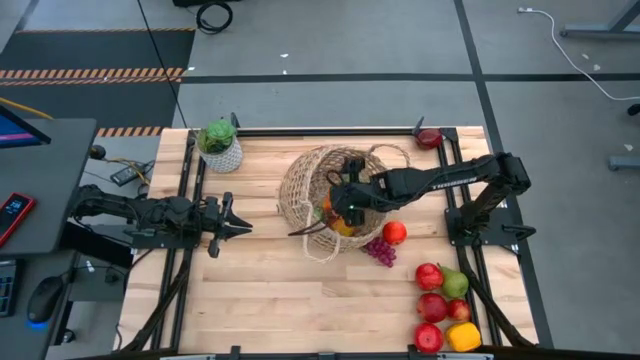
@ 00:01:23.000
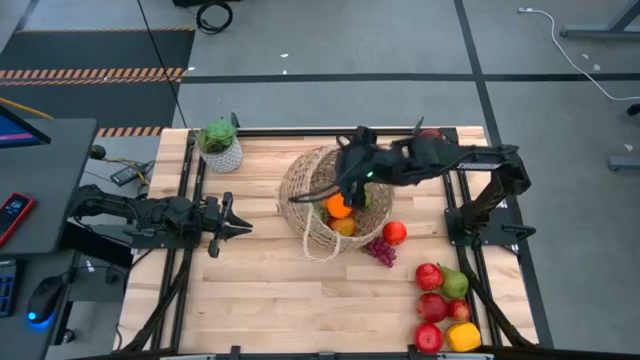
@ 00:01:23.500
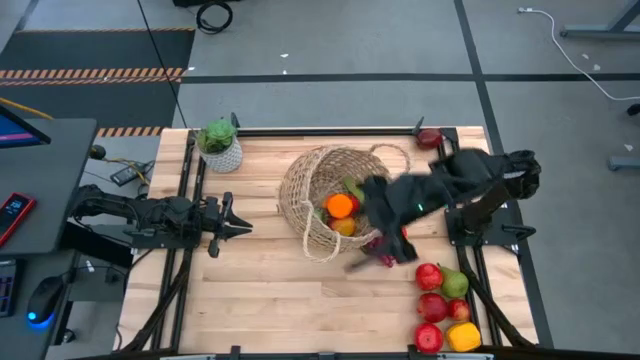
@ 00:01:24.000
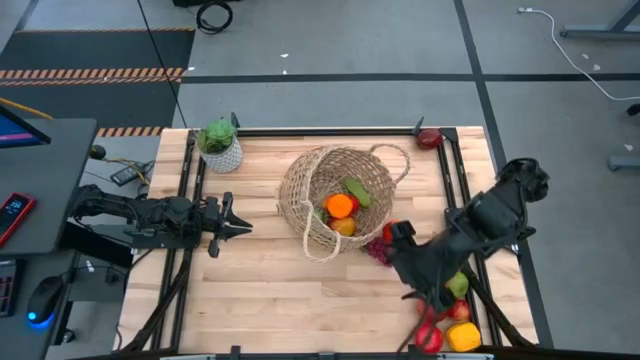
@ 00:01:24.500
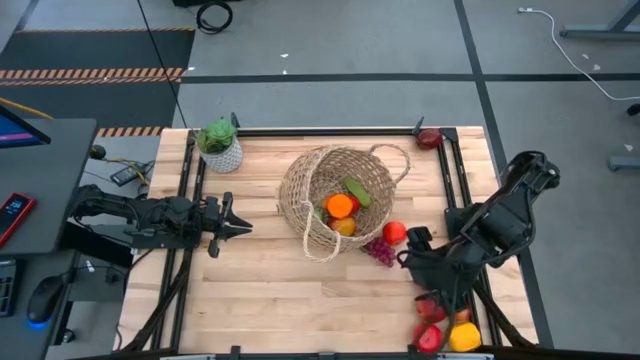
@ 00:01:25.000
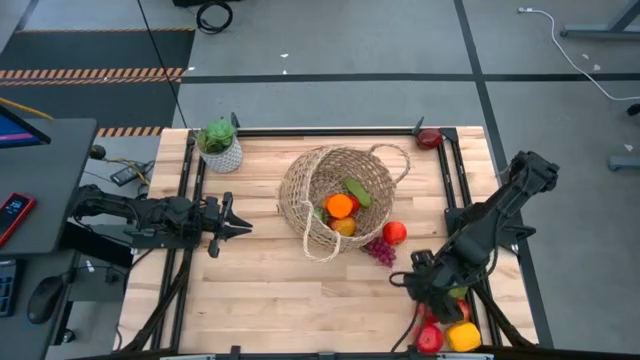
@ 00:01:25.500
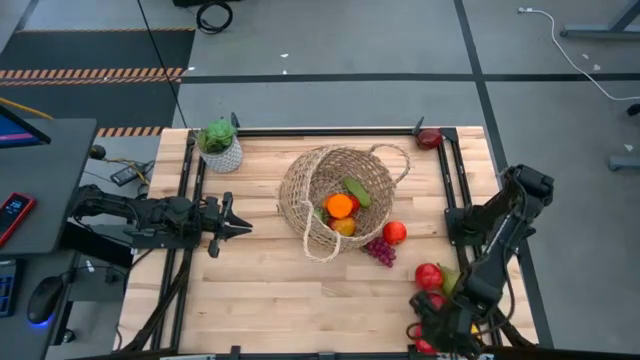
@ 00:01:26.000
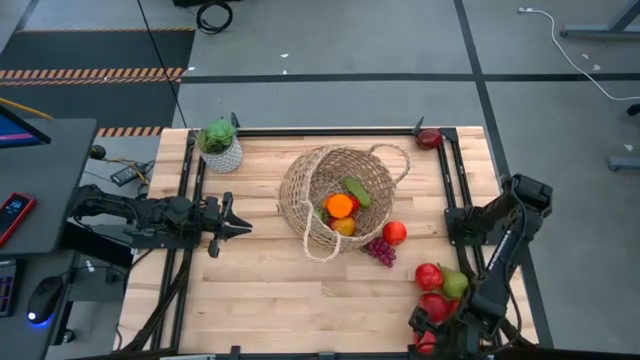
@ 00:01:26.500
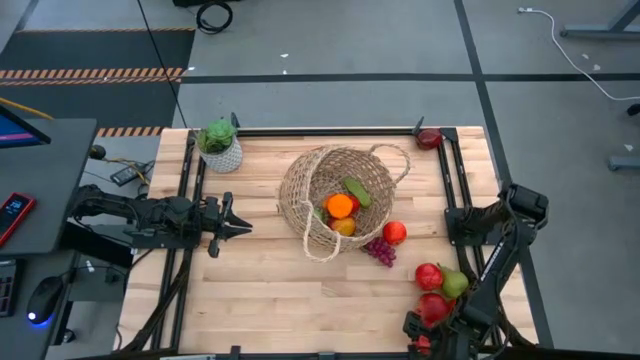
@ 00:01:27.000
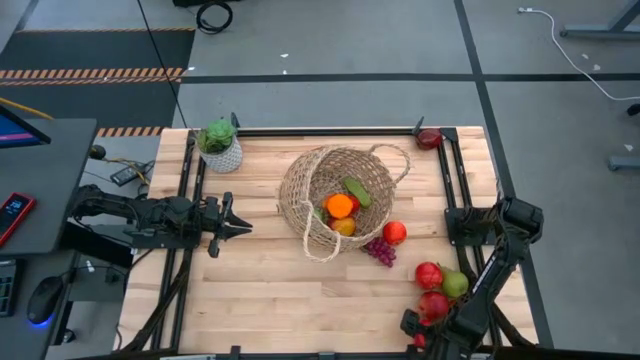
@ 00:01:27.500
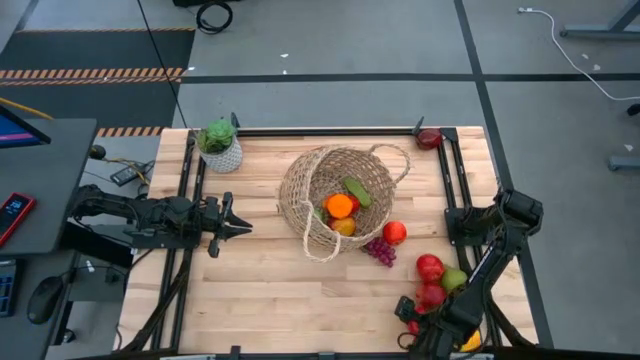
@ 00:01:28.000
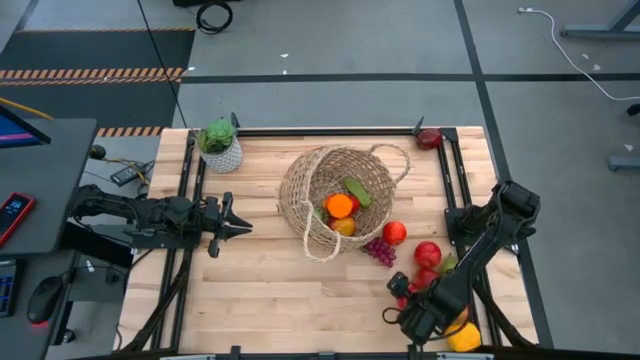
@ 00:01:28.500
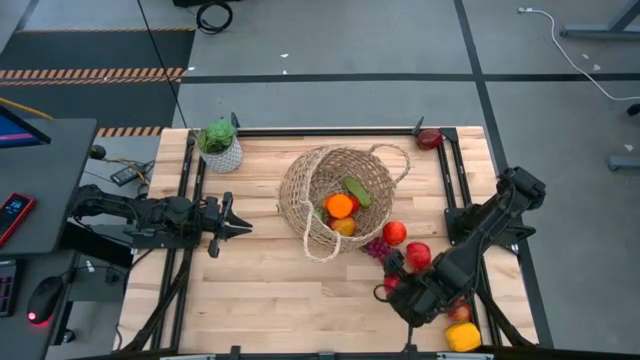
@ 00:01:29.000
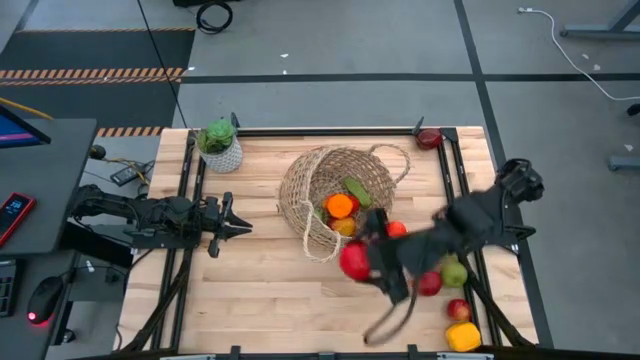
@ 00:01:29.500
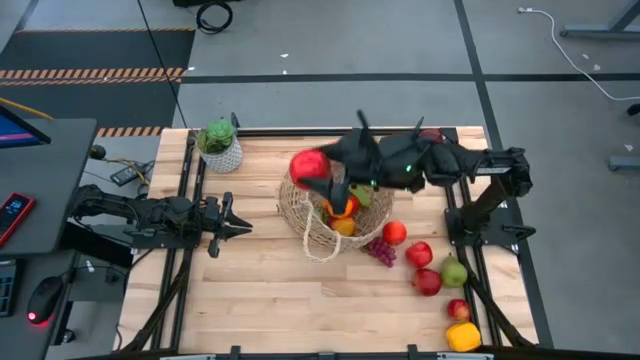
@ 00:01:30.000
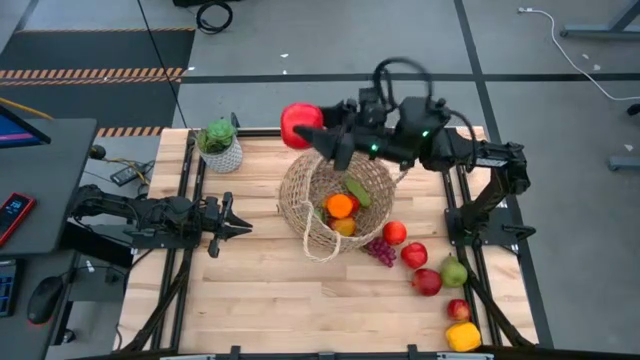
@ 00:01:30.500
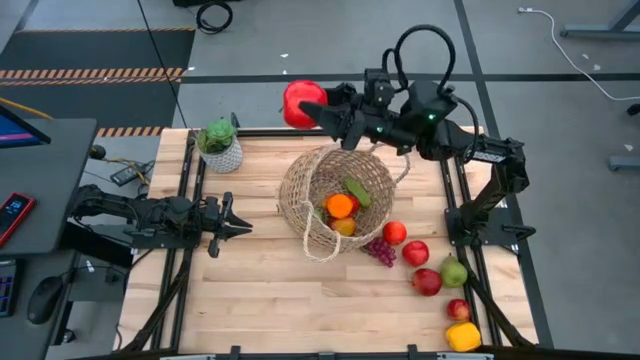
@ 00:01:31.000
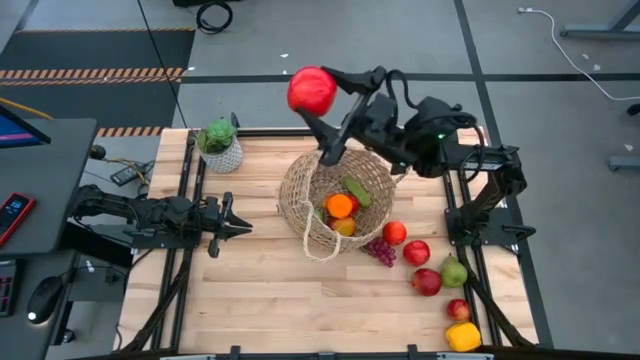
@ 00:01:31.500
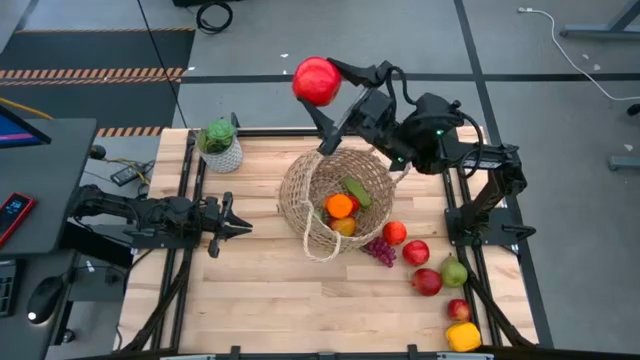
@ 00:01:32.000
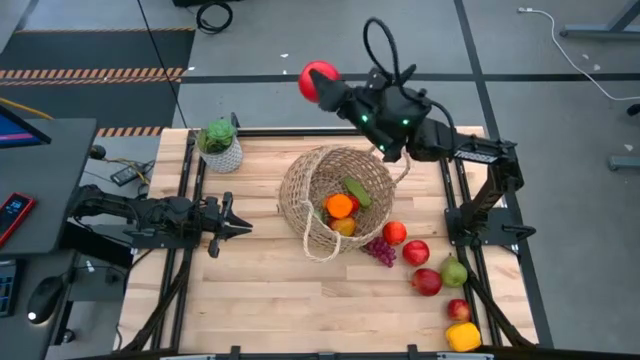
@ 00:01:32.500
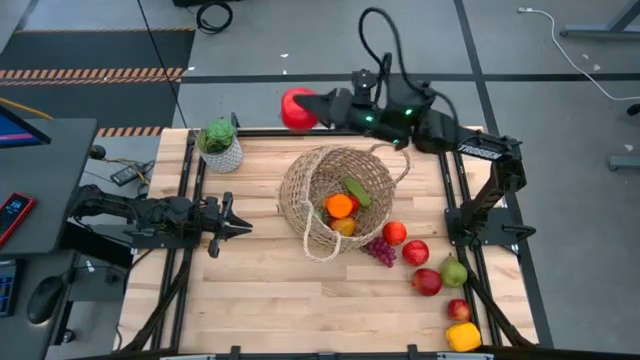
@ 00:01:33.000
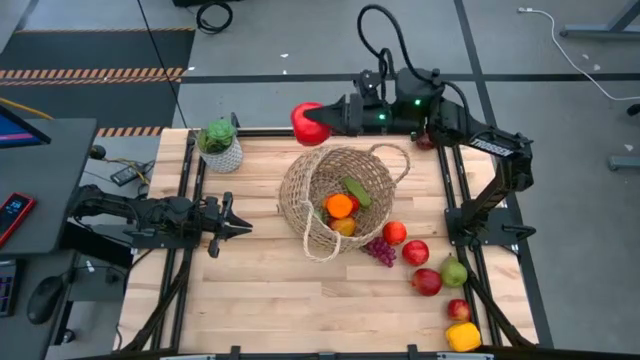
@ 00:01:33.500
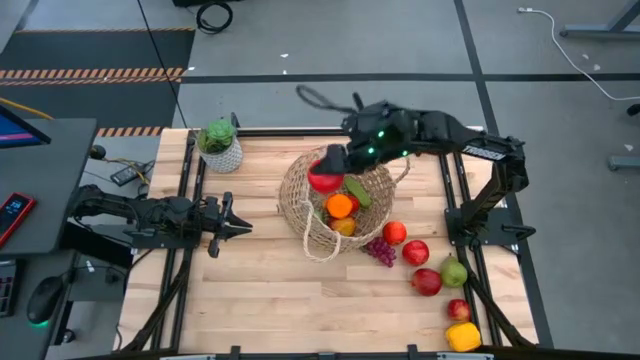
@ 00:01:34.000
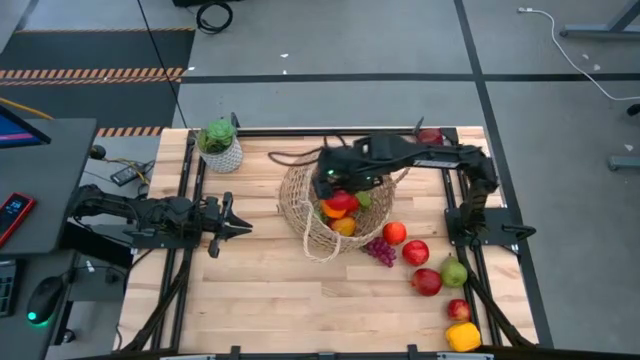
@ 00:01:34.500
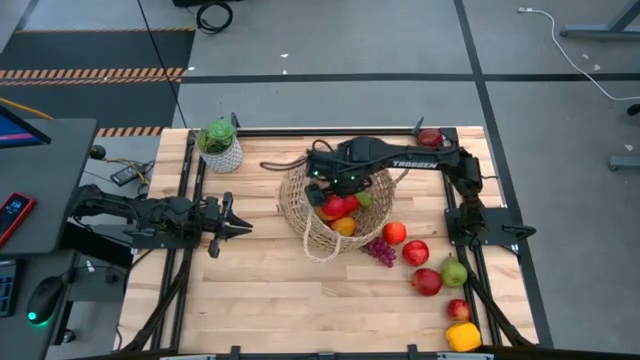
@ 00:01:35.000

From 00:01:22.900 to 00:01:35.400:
Task: Build produce basket
Put the red apple into the woven basket

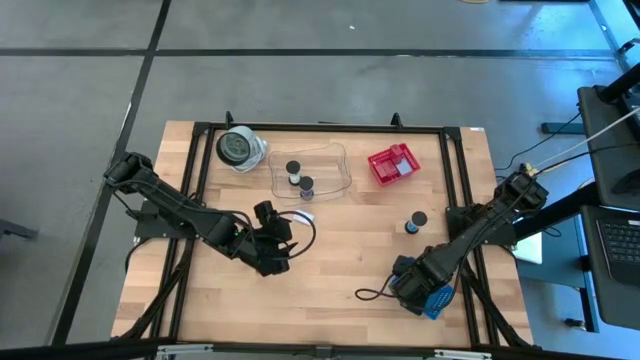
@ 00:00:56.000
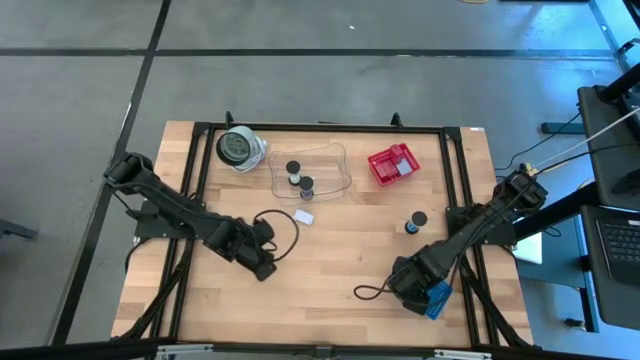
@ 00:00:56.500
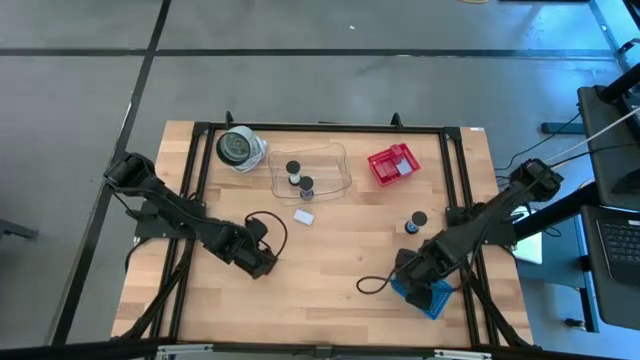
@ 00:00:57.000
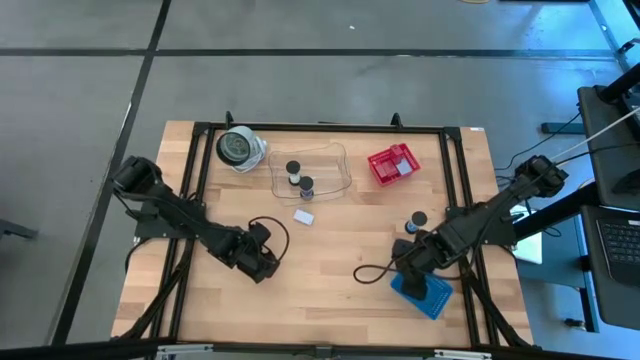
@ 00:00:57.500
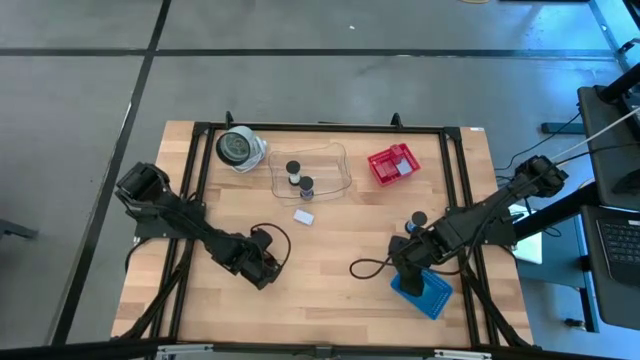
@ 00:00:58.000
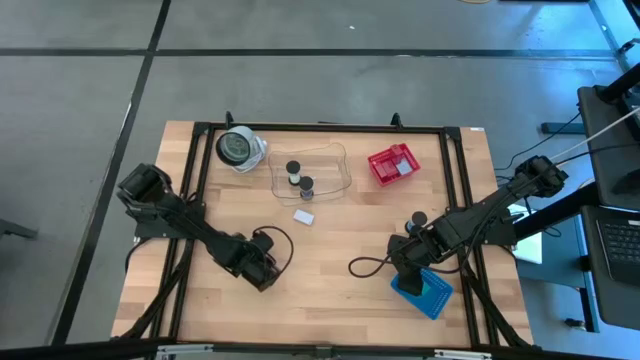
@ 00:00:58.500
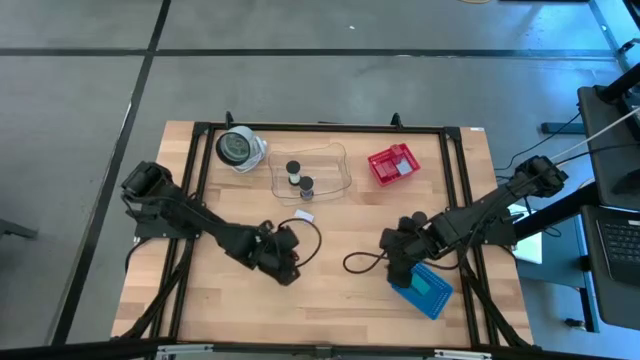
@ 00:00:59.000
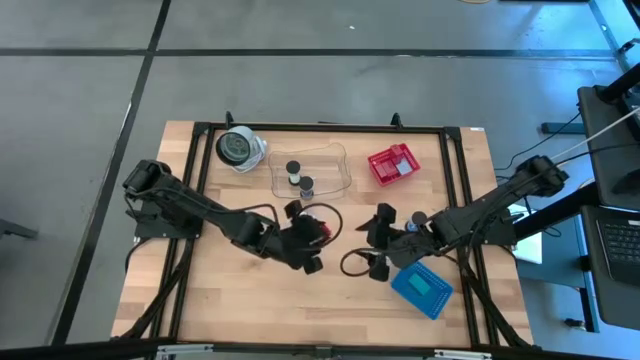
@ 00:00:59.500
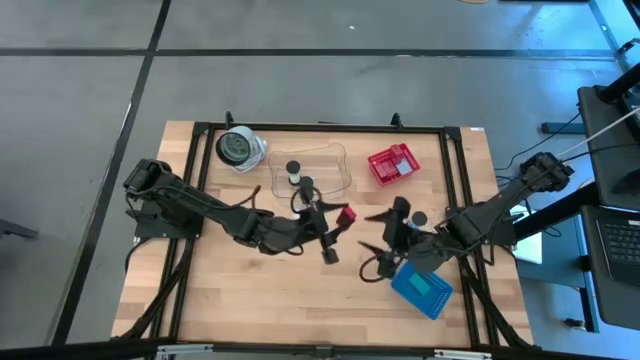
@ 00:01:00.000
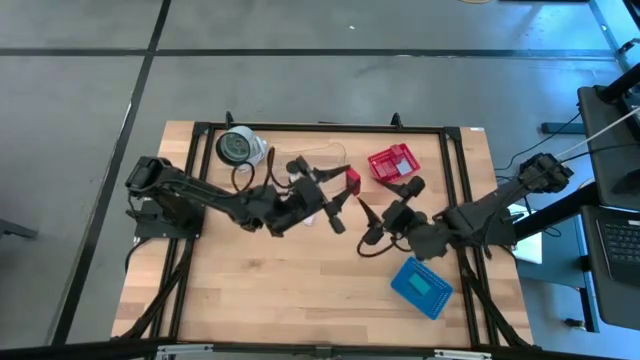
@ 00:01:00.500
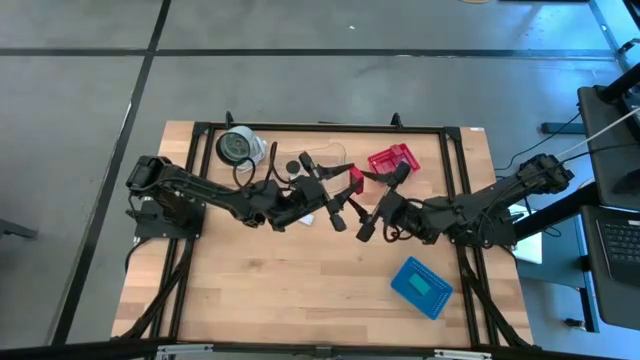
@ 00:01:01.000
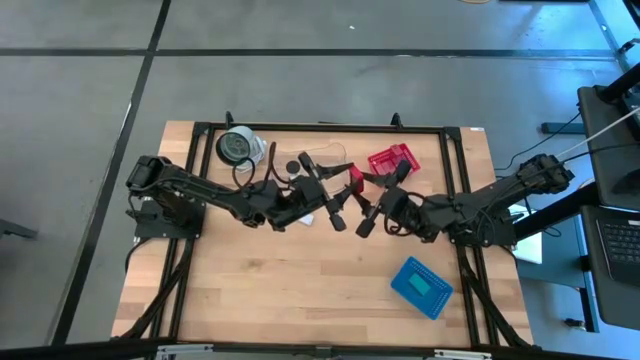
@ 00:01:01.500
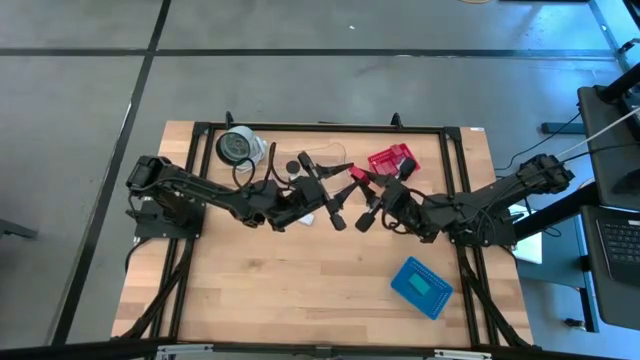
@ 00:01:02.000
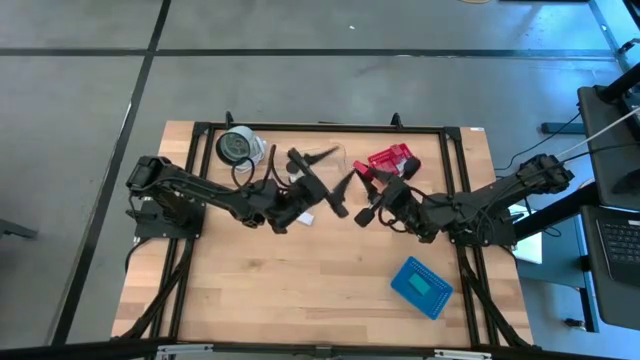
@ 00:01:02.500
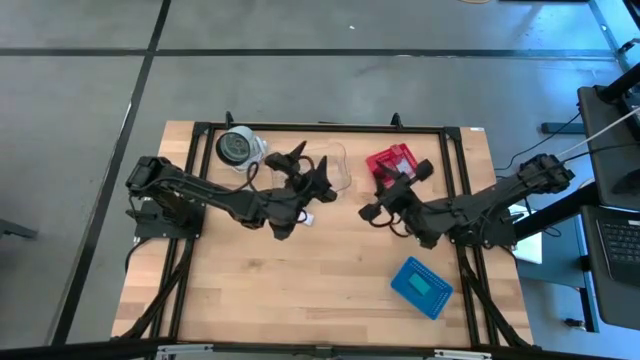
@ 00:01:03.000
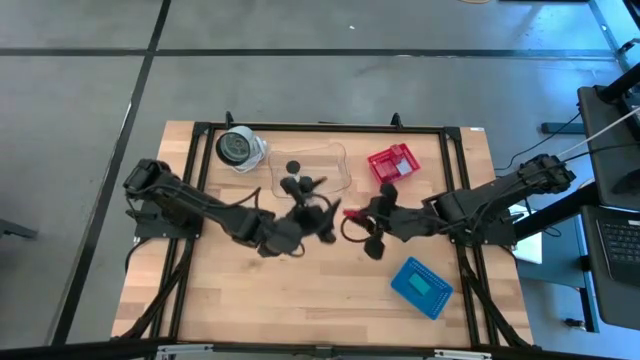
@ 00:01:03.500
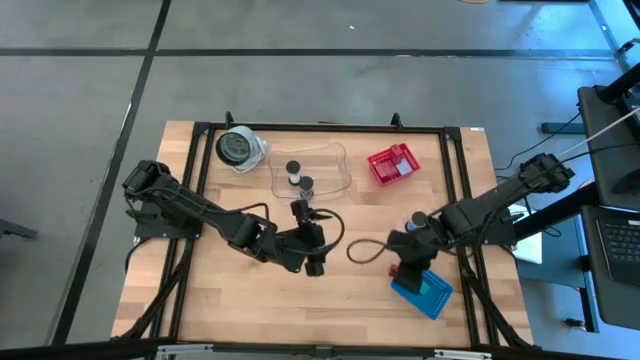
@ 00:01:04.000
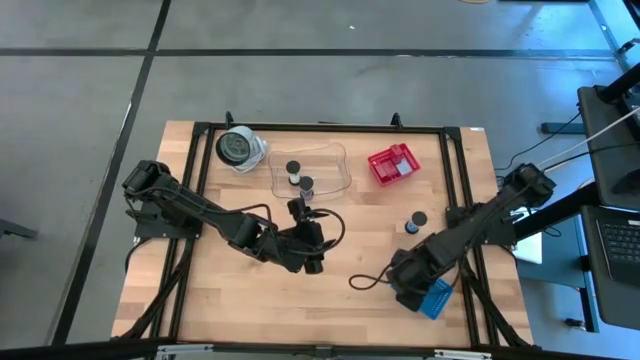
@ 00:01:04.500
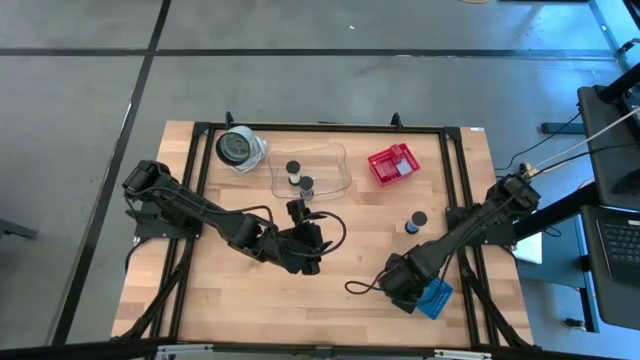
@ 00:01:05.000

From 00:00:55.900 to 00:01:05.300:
Task: Pick & Place Office items
Put the red digital timer into the blue bin
